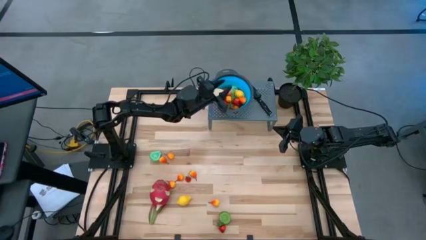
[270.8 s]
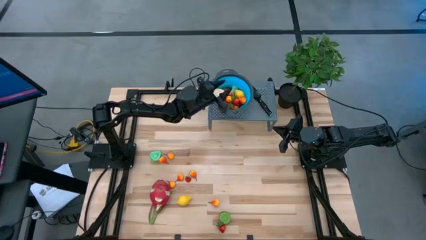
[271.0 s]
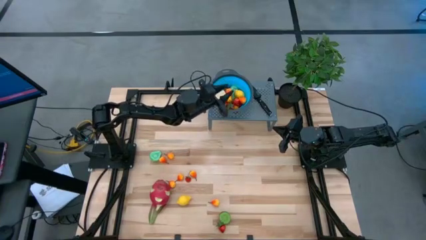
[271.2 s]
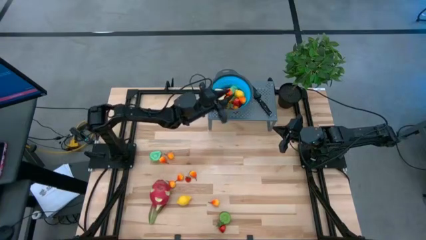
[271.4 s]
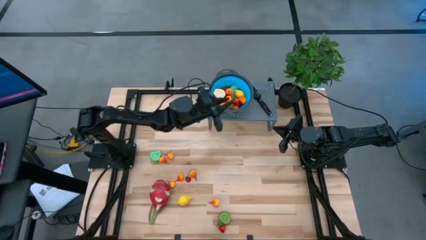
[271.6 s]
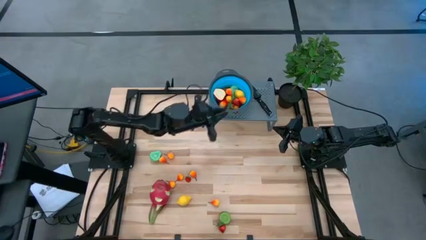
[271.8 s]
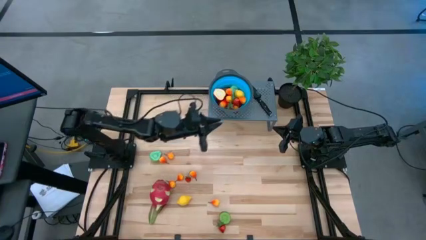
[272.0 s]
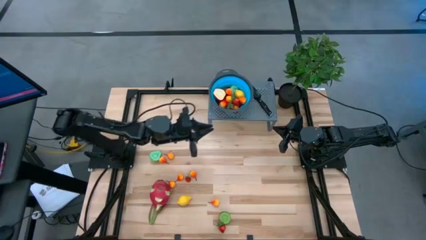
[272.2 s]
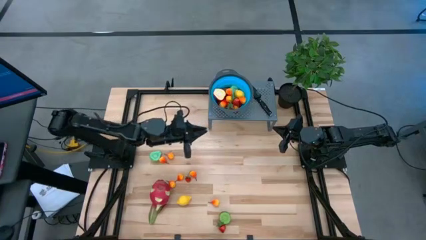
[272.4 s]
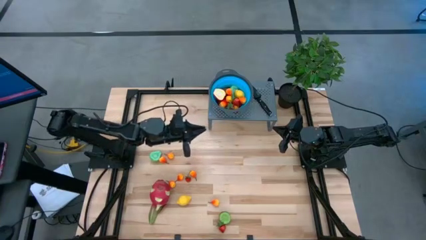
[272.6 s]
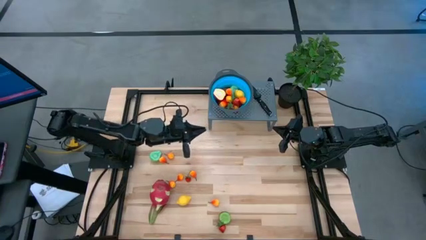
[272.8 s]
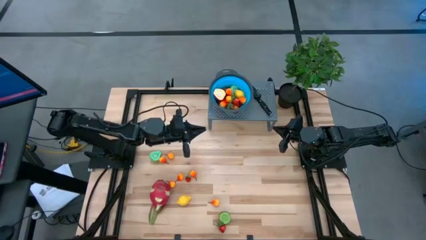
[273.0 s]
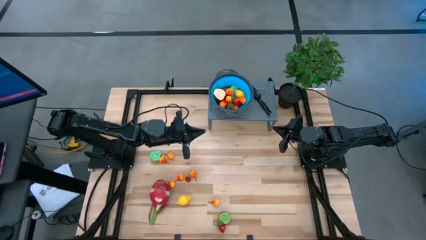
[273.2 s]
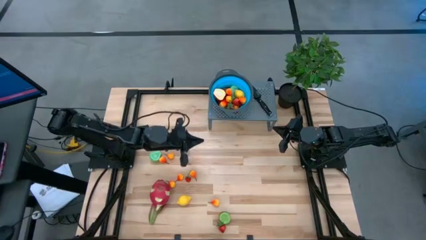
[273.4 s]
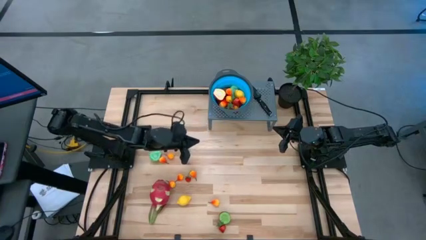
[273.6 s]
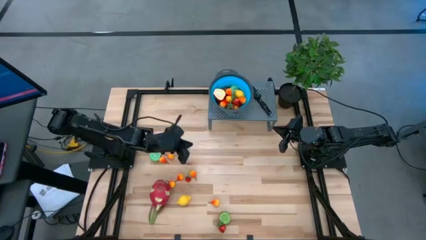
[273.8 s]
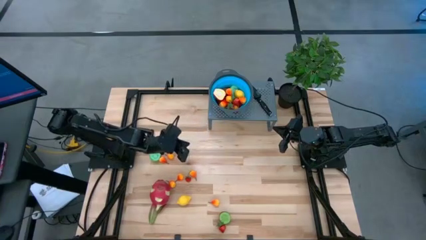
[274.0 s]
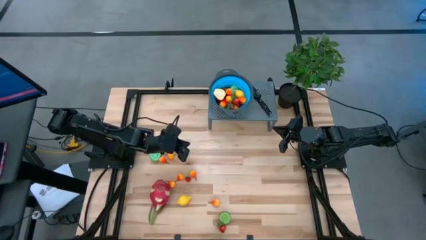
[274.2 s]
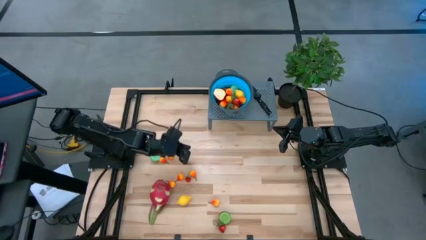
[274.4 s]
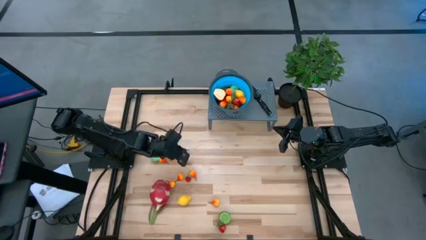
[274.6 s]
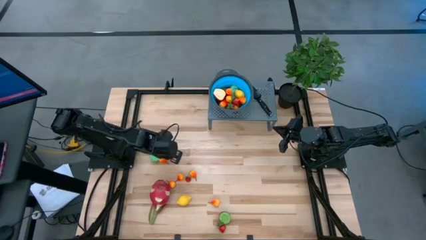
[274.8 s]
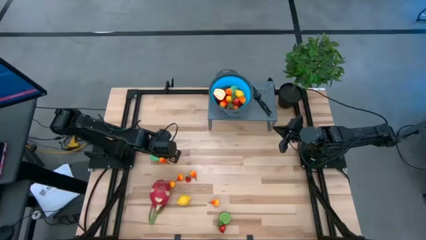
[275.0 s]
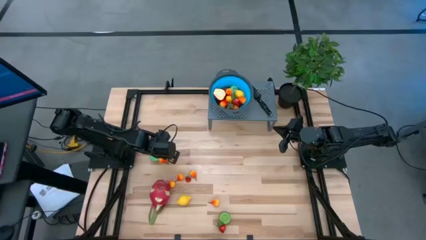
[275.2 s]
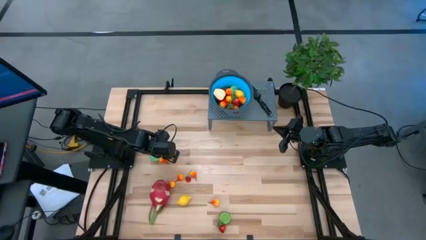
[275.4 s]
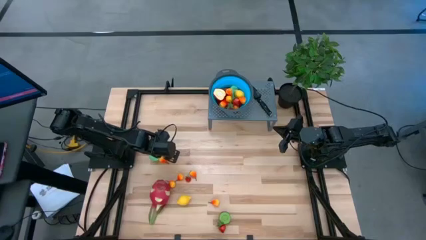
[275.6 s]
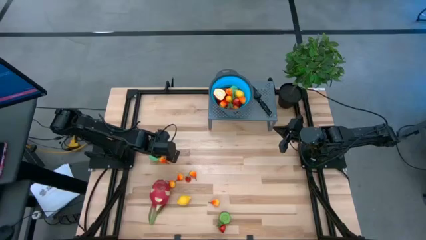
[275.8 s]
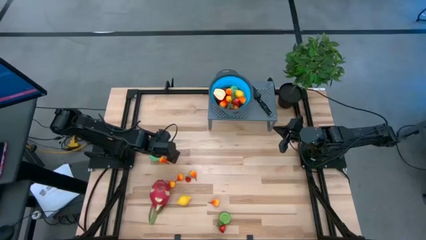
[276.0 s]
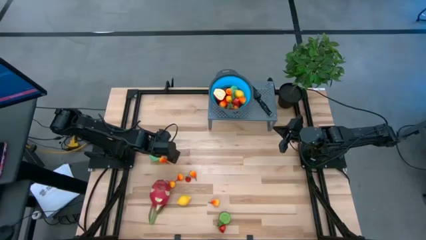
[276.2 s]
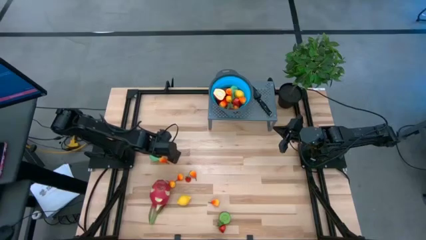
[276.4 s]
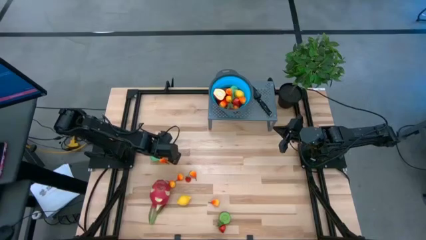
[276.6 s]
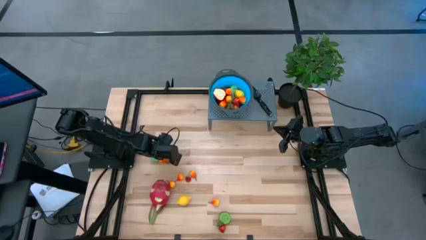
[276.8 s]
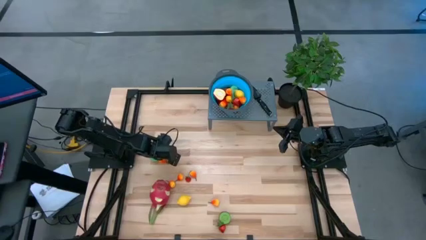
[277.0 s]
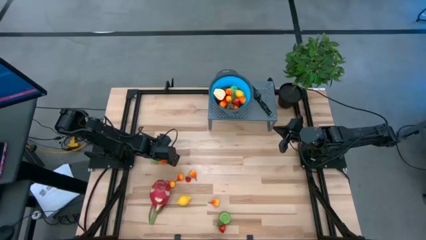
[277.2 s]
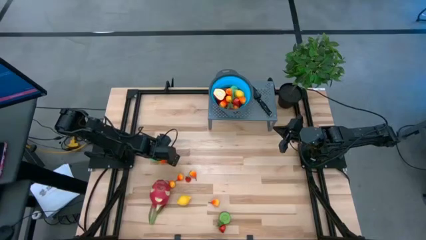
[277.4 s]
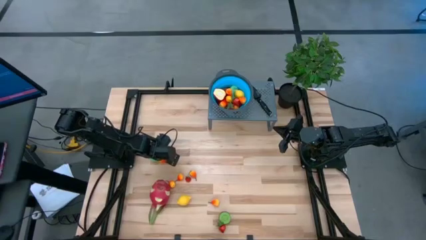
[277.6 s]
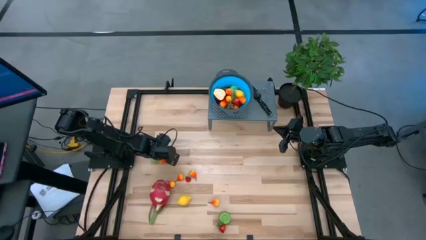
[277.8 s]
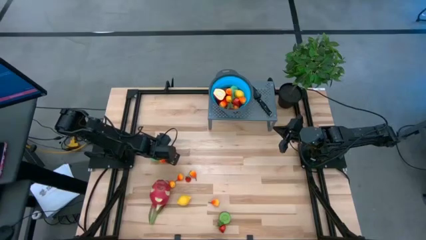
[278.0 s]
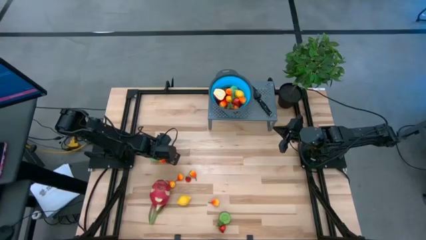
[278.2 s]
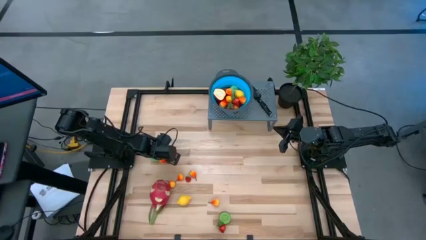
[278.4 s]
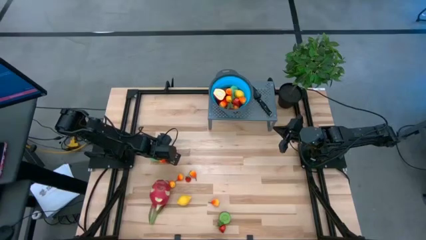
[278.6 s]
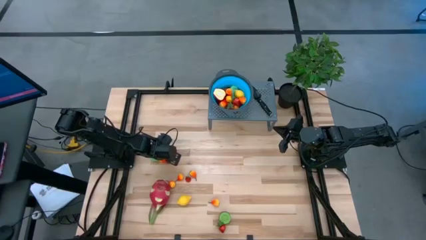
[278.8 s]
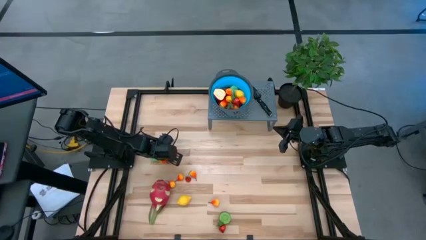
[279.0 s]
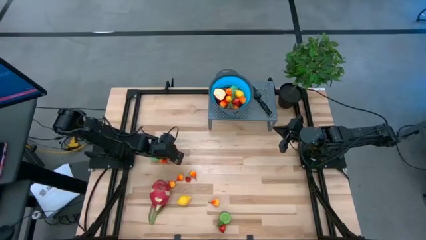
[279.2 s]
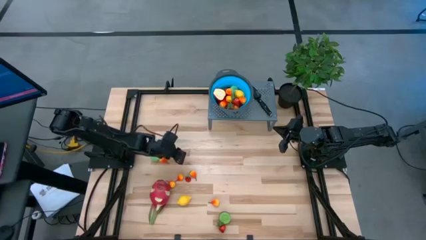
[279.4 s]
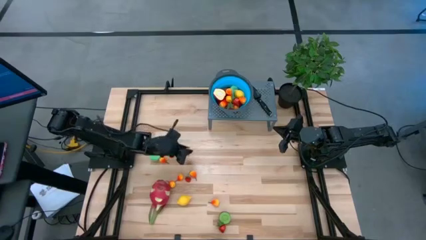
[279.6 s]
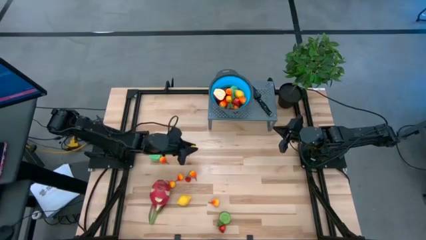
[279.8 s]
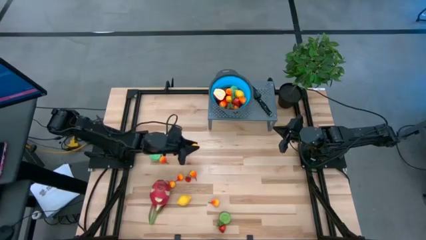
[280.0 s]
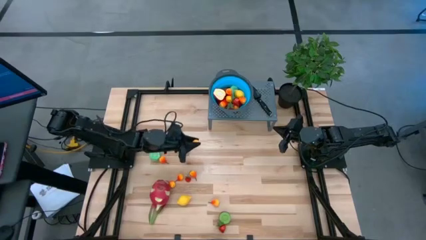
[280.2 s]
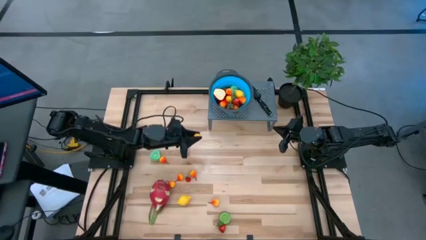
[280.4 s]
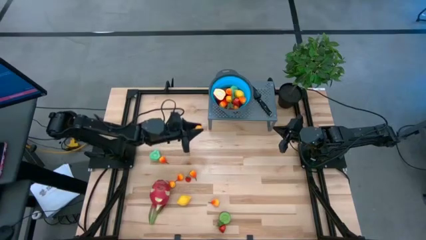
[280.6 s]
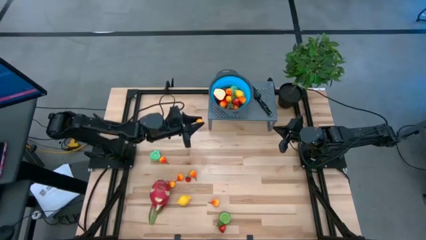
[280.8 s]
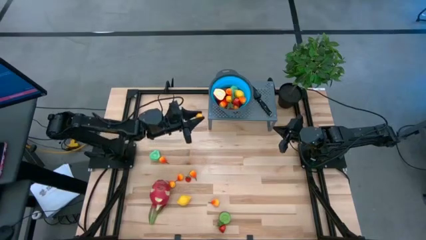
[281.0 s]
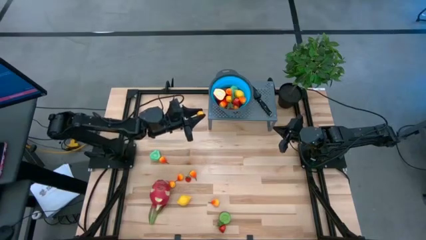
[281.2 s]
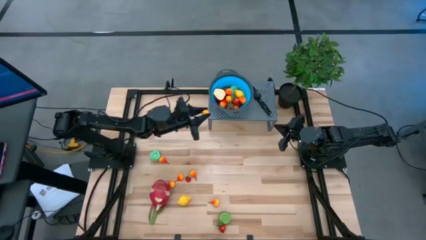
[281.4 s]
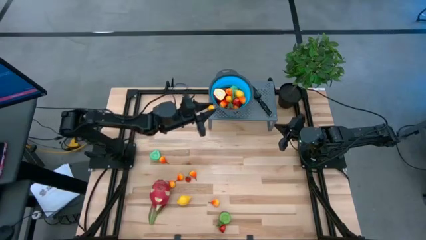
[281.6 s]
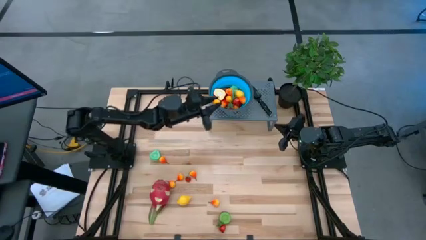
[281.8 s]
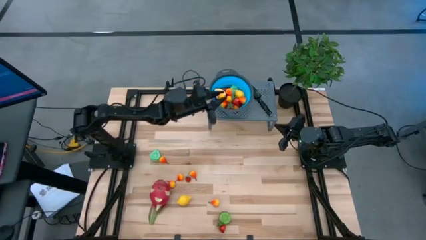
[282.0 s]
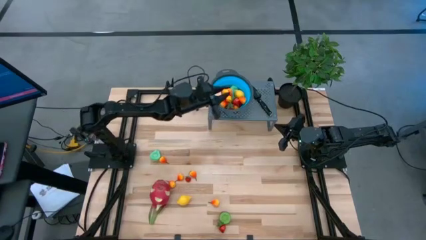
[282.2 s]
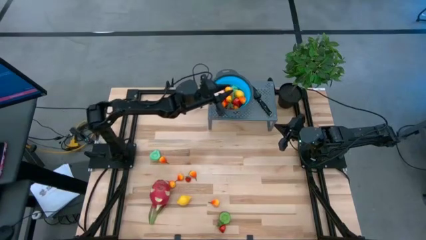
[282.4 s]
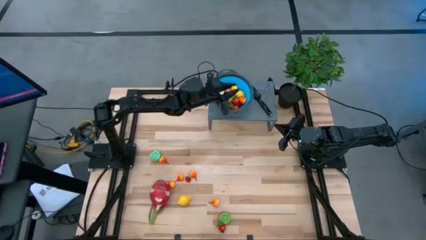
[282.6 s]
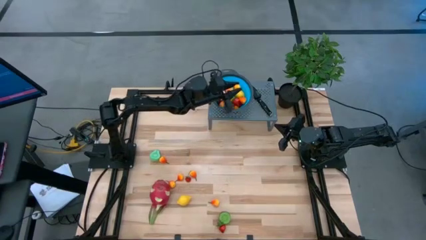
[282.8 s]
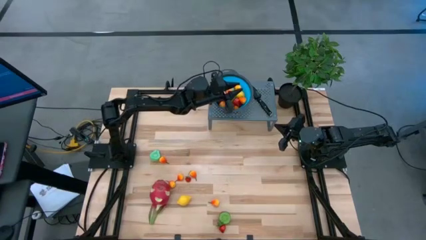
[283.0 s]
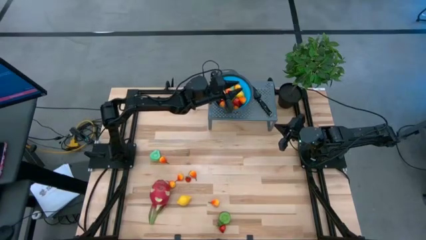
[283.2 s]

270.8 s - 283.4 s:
Task: Pick & Place Fruit
Put the yellow pear into the strainer bowl

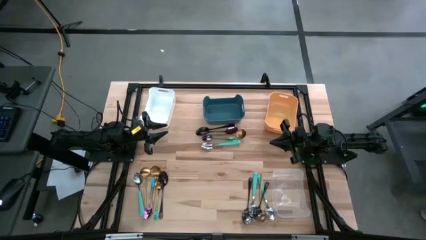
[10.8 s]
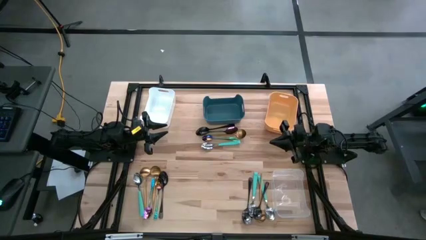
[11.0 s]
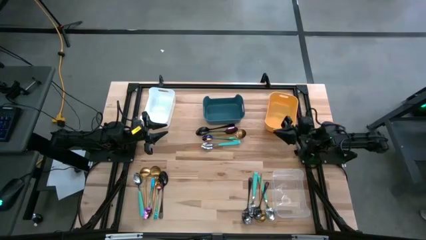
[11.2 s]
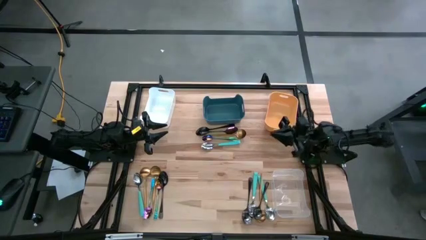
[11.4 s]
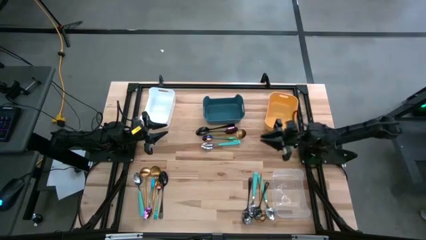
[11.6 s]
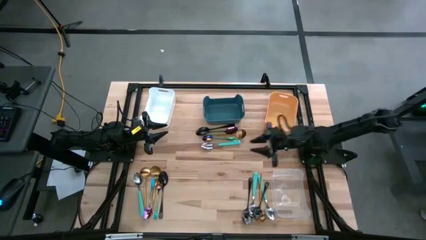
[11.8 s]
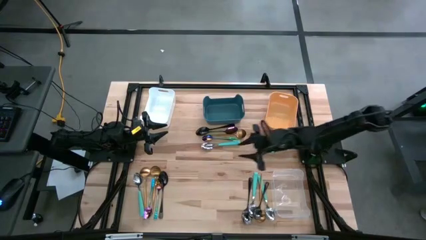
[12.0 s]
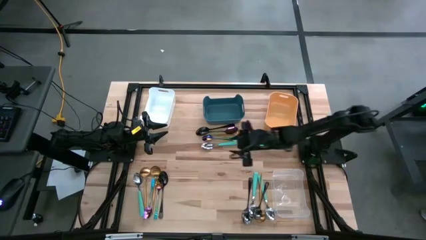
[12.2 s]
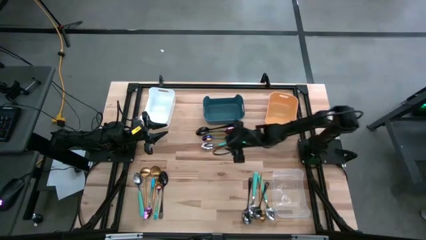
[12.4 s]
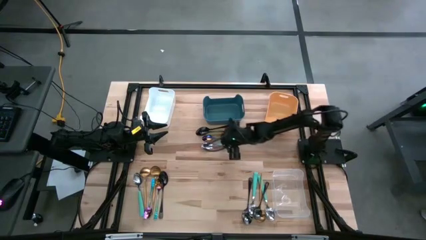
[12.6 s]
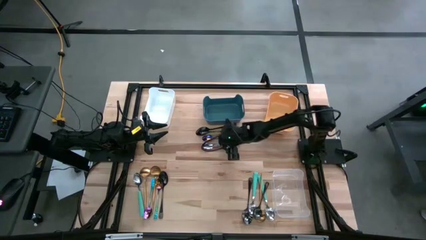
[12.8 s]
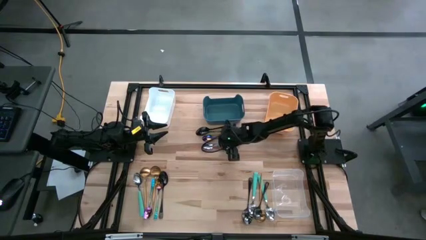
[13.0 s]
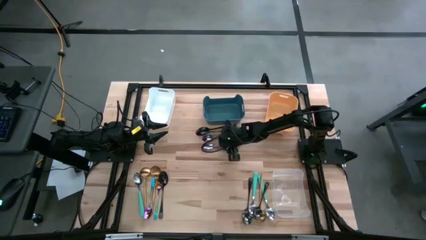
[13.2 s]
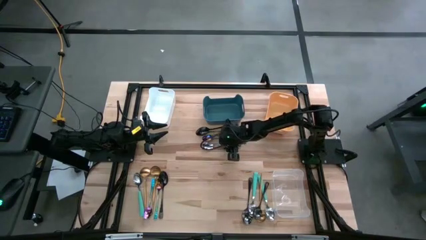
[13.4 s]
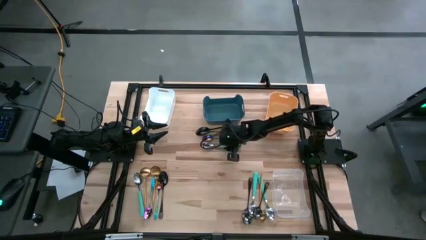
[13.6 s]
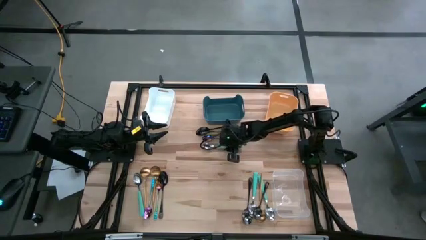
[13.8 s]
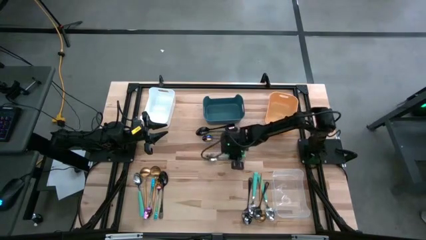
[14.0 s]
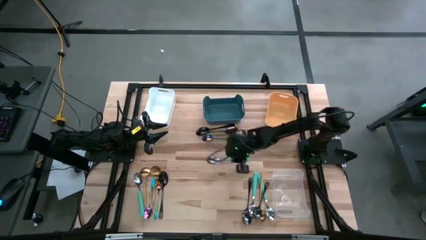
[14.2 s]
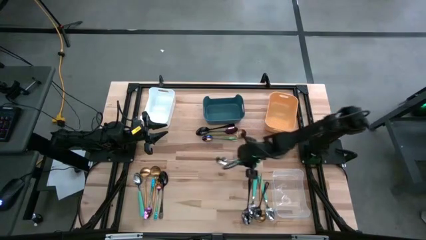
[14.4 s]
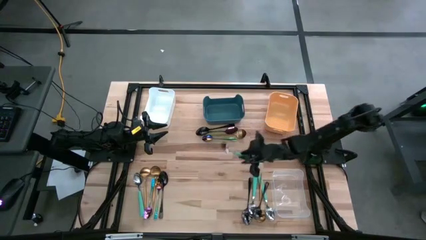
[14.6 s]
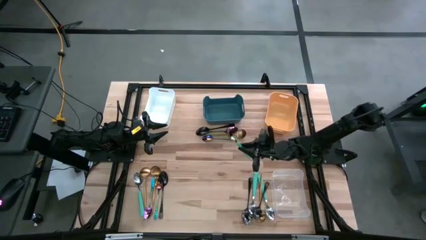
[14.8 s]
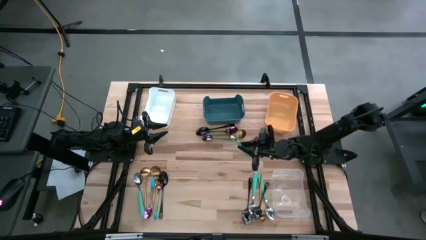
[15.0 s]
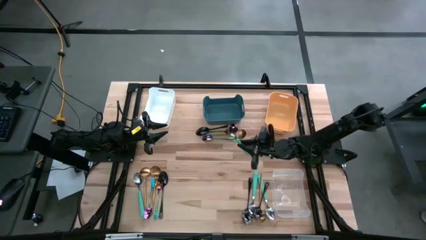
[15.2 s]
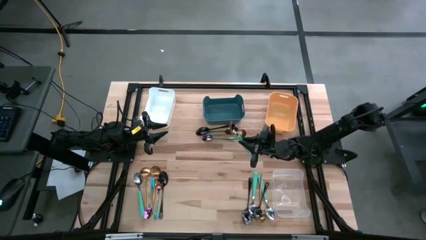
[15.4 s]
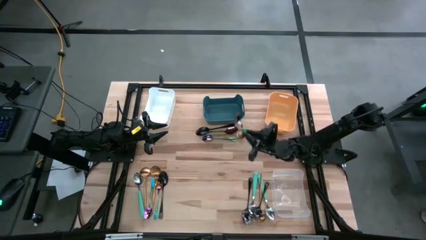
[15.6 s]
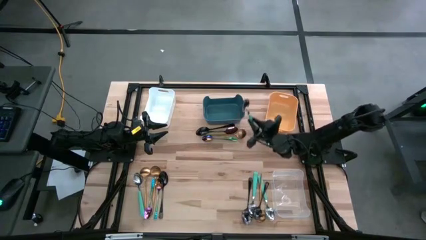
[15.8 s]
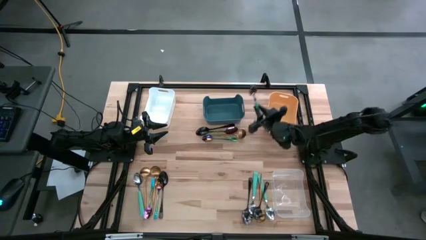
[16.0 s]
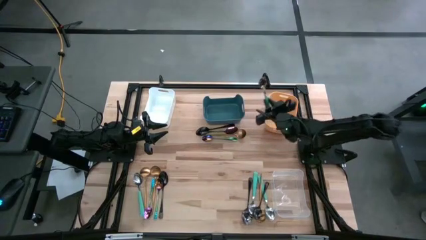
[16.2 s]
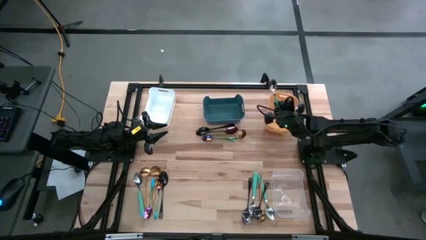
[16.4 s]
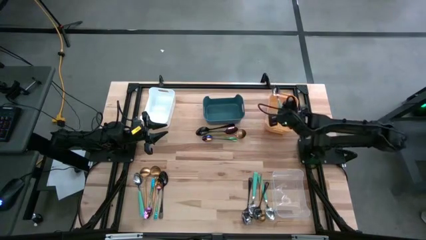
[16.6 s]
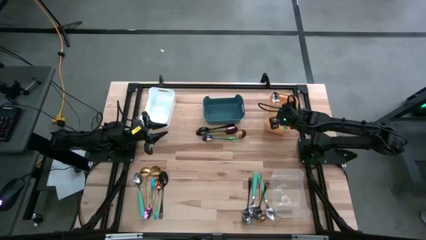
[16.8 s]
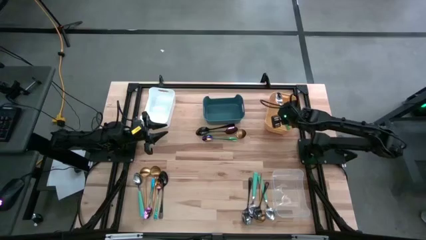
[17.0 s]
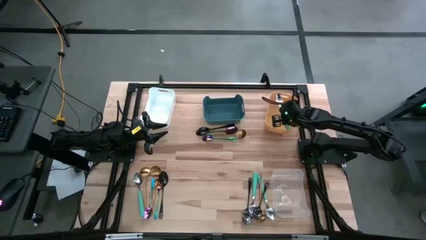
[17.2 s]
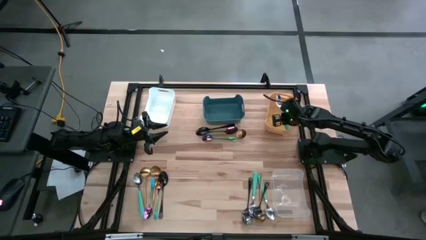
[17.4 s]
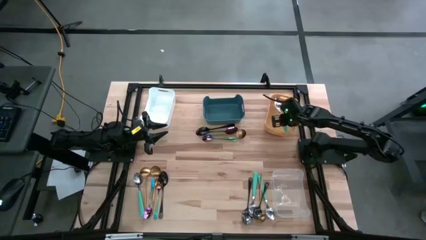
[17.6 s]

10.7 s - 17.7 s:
Task: Sort silverware by color (type)
Put the light green spoon into the orange bin
